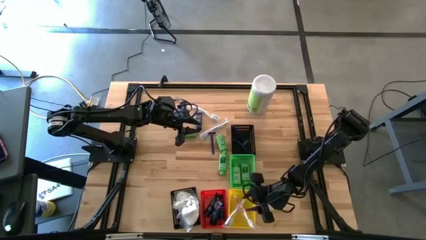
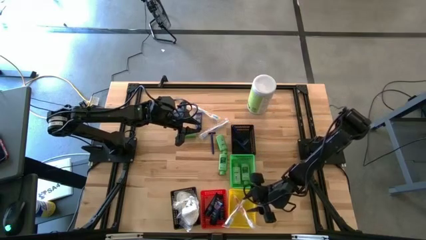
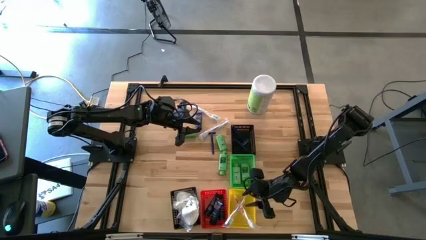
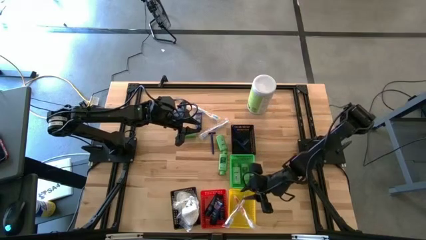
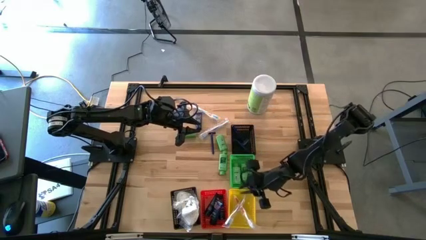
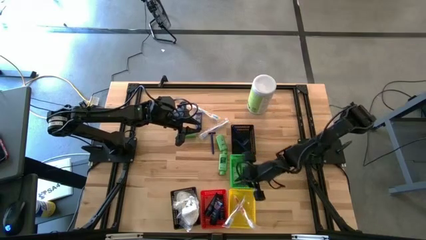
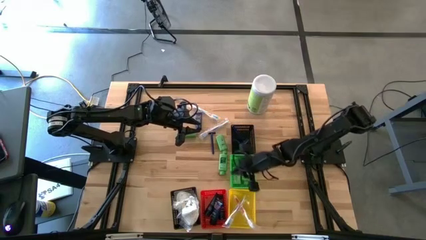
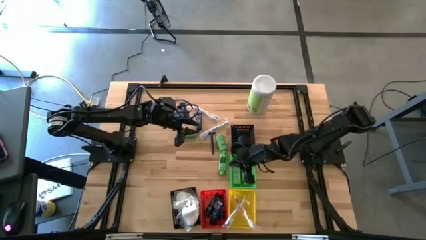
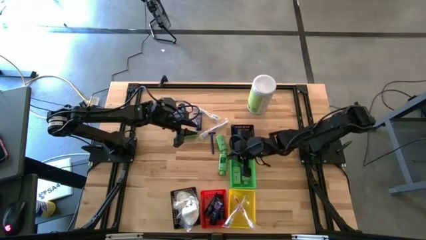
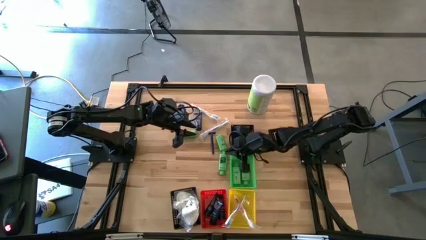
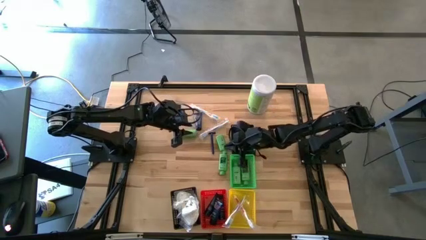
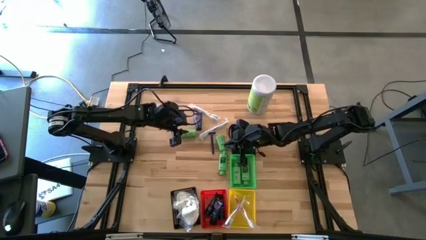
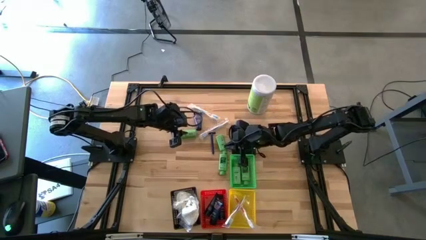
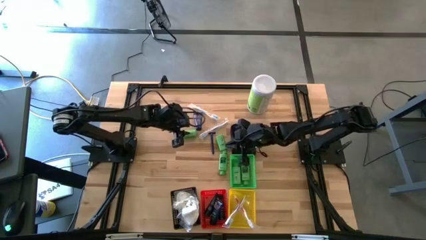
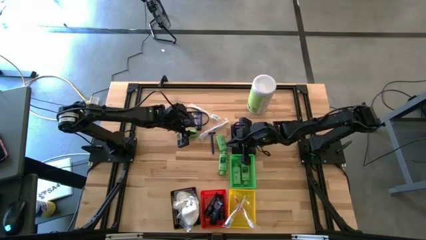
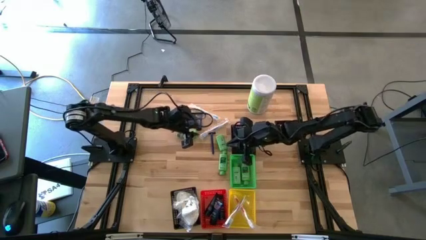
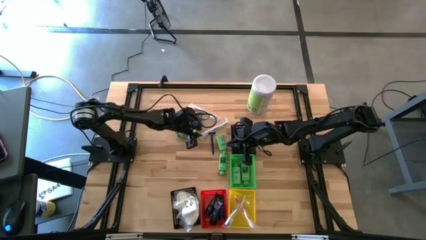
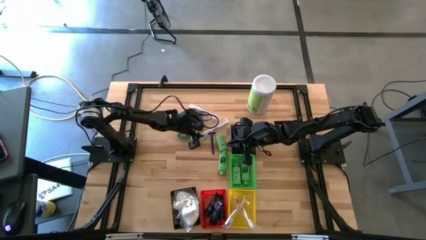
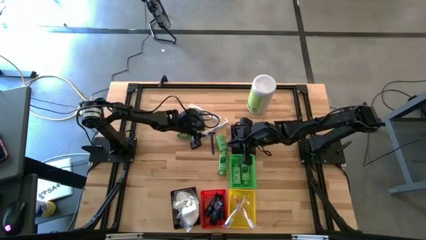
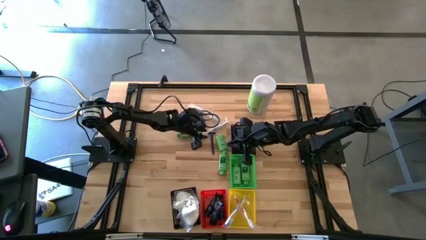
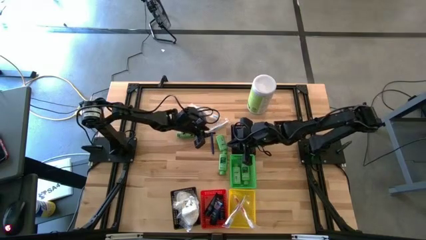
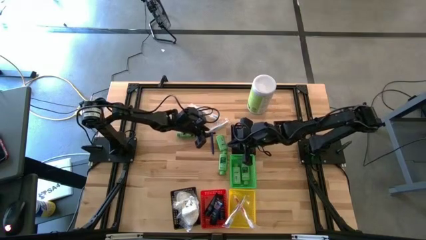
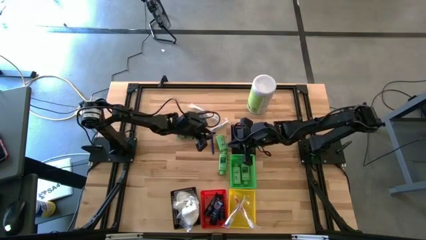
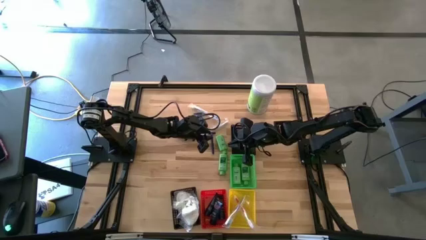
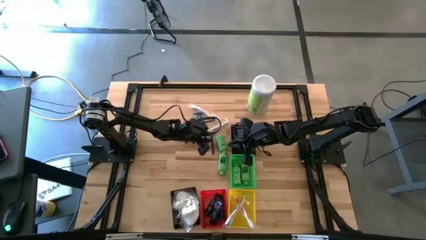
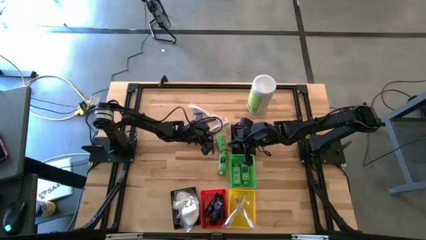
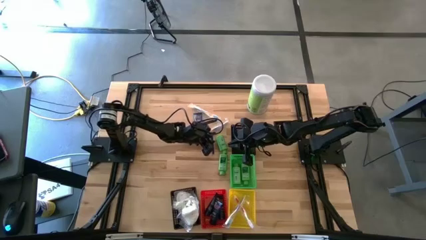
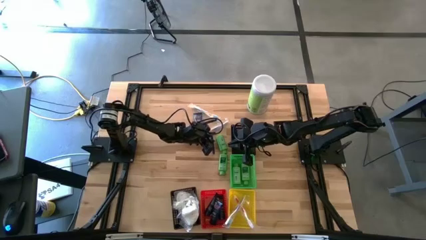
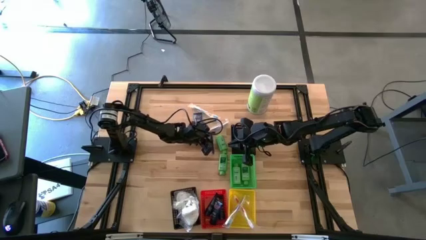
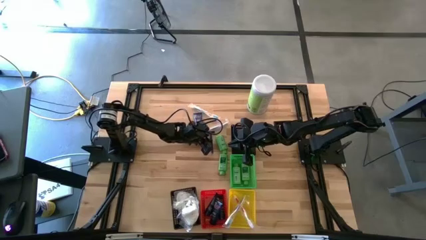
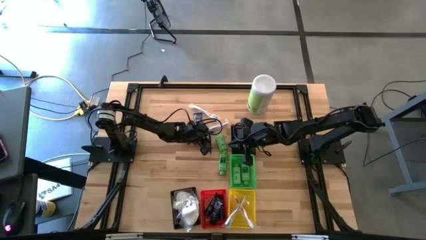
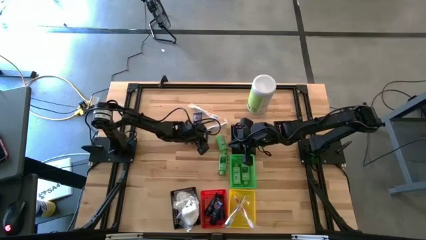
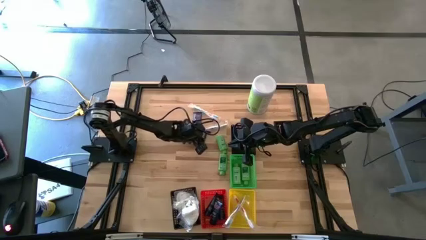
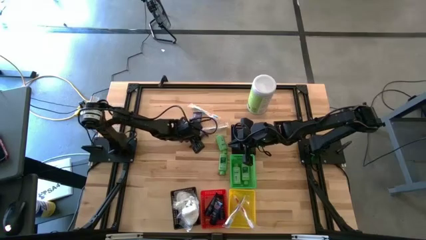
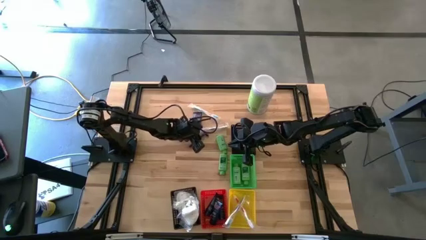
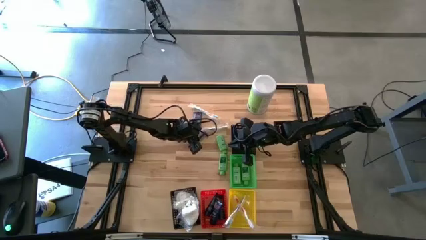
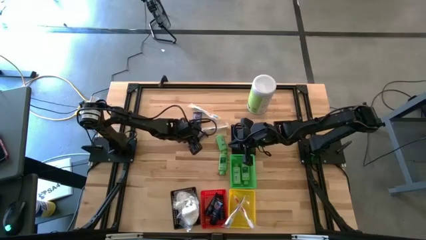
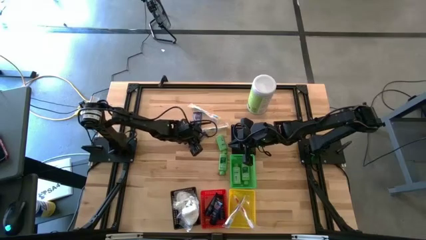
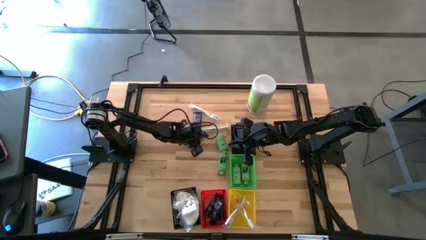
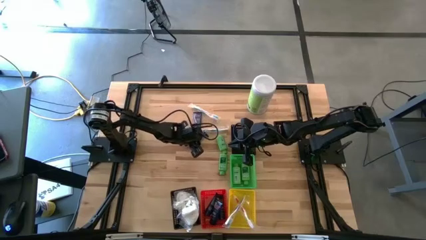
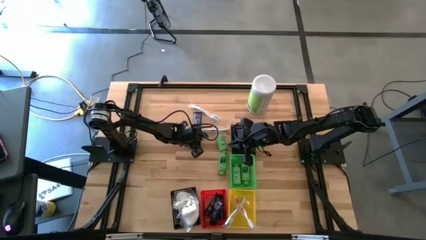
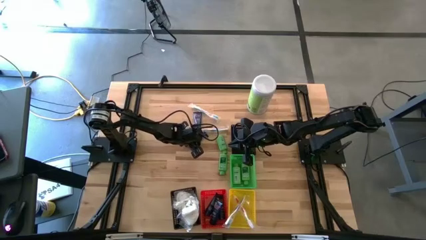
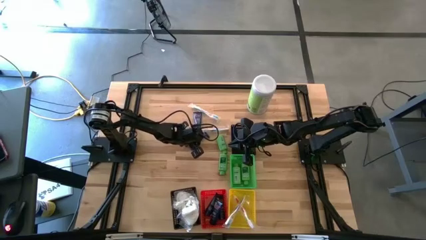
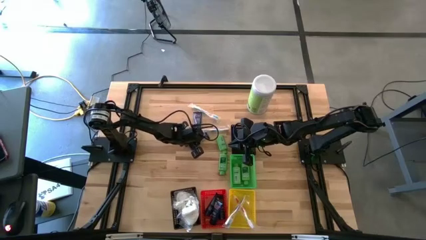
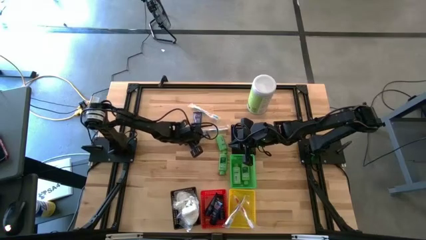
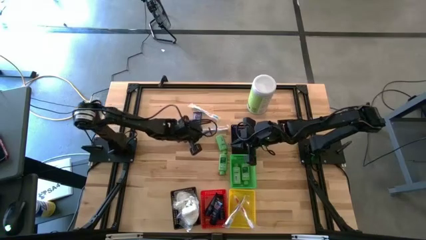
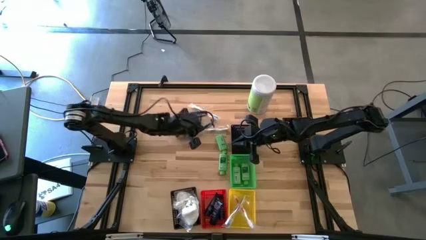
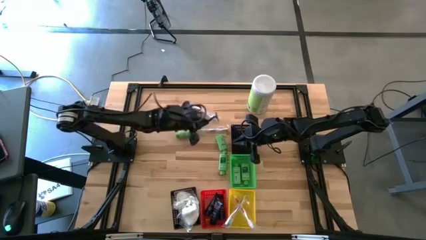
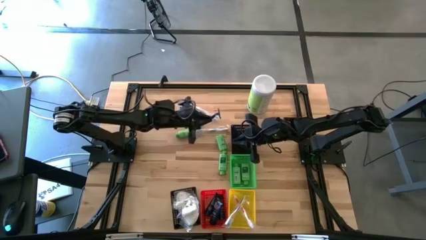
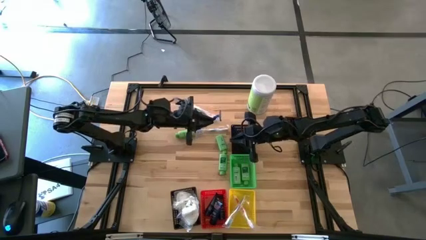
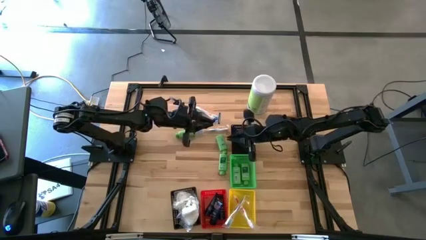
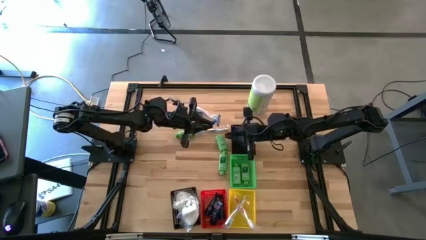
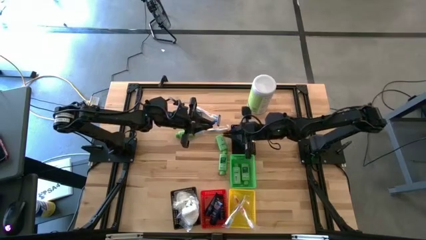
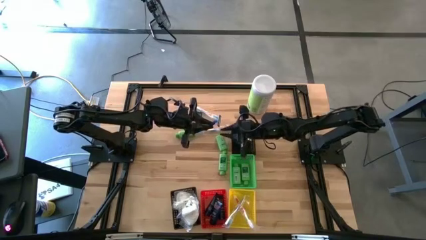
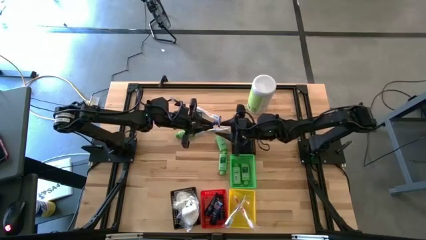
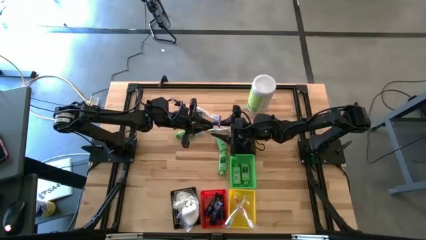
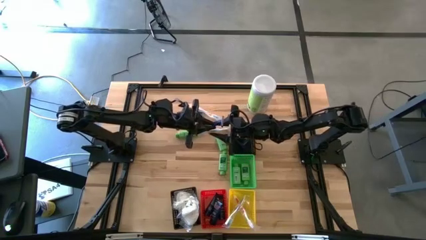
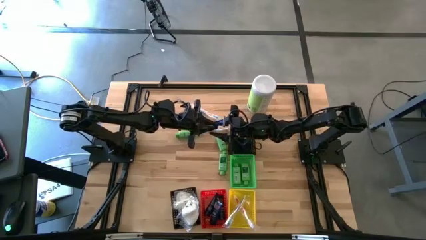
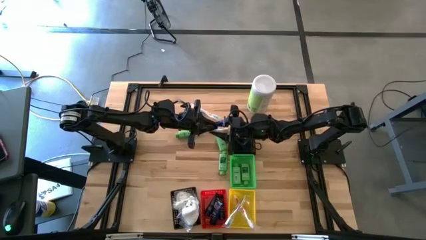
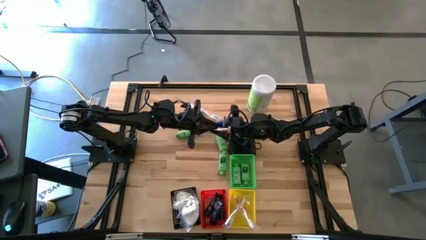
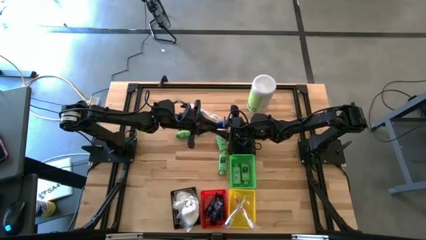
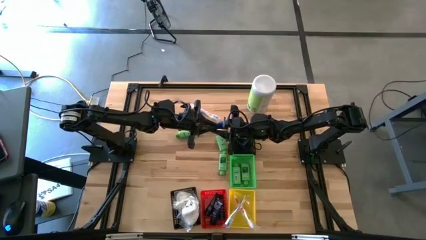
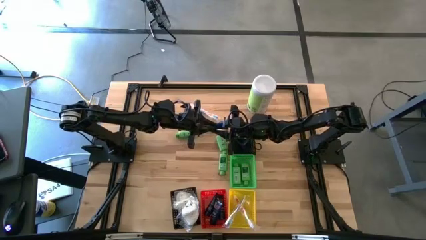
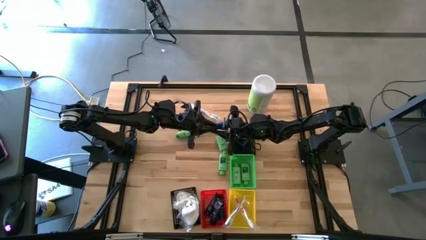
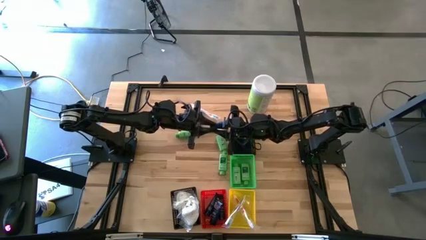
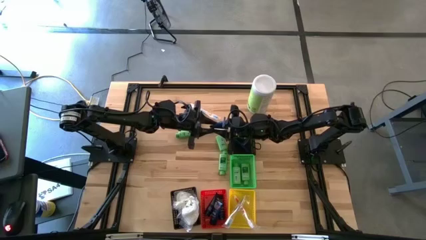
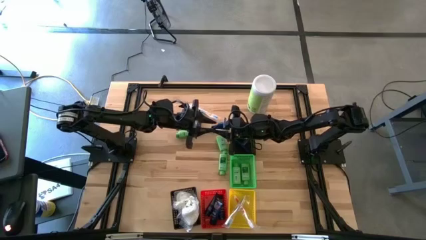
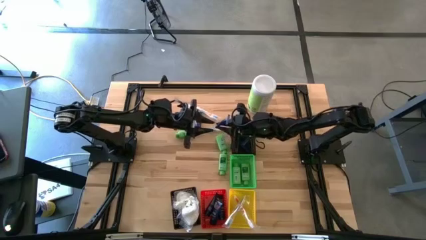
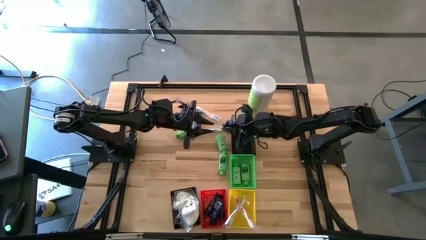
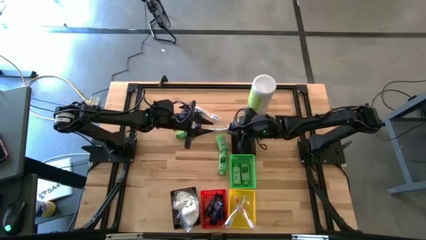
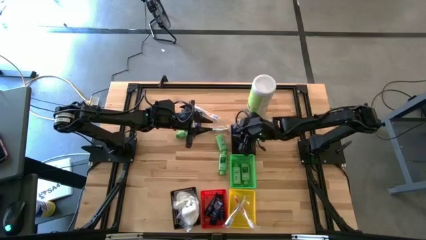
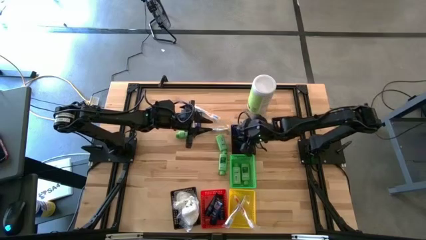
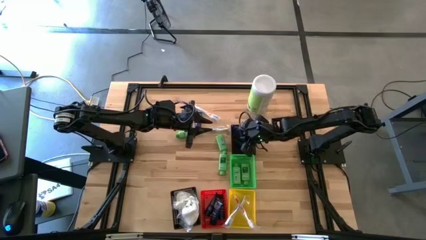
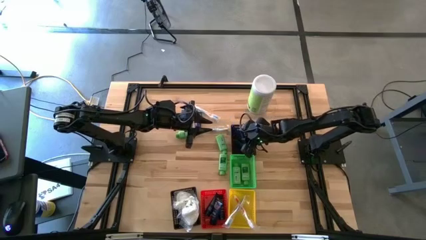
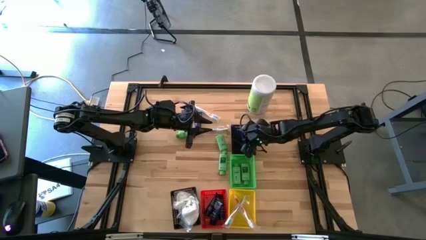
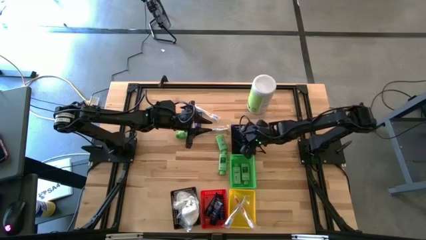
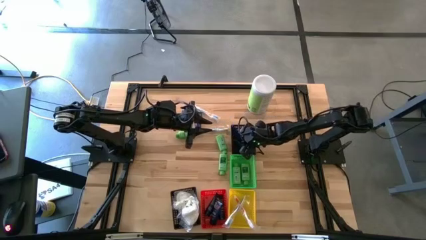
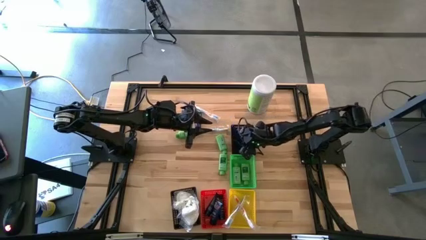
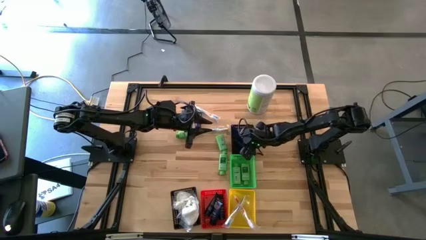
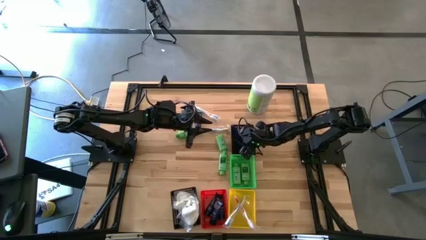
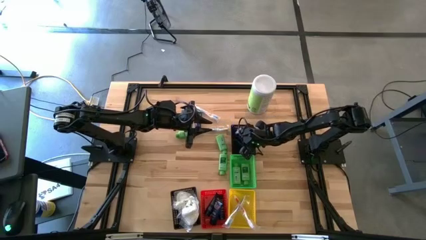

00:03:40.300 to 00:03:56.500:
Task: Pick & Place Travel size toiletries
Put the blue razor into the top black bin

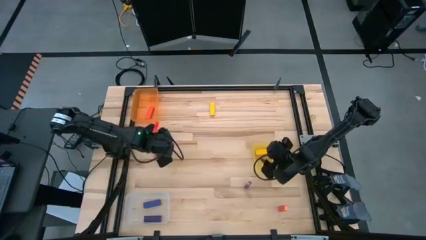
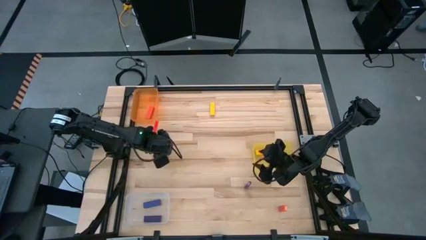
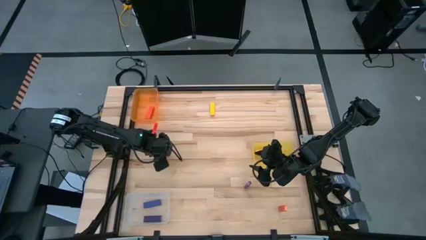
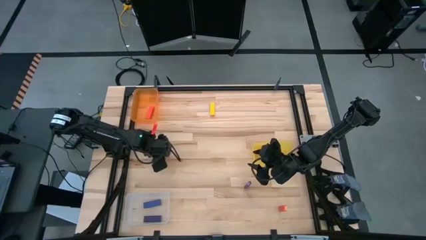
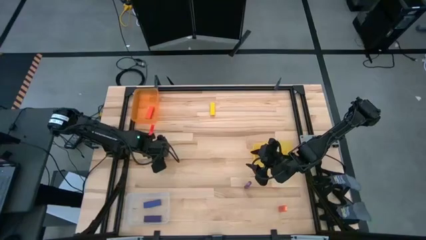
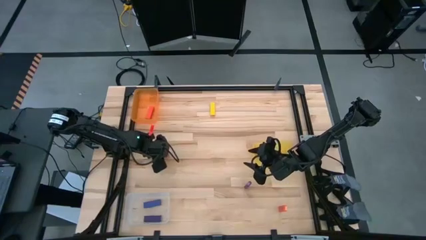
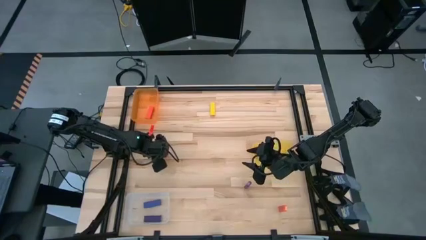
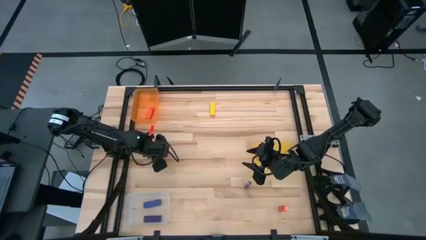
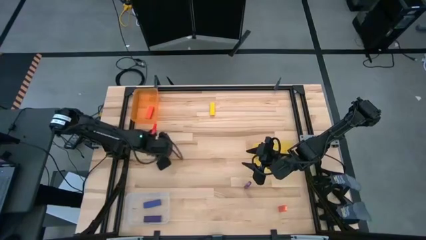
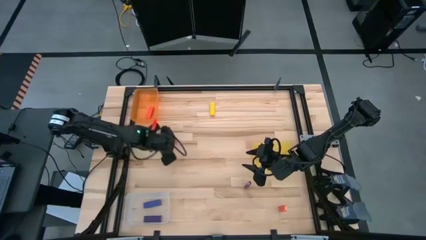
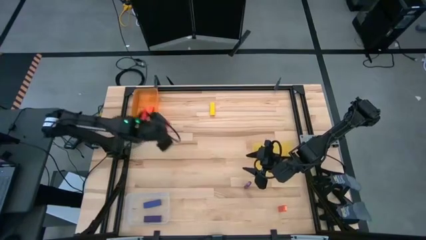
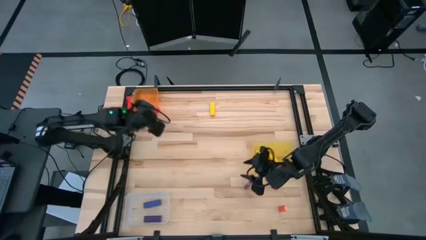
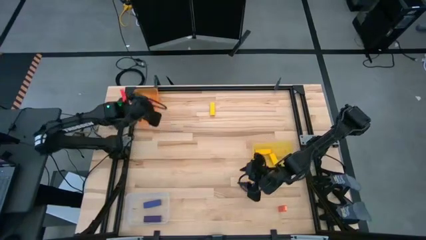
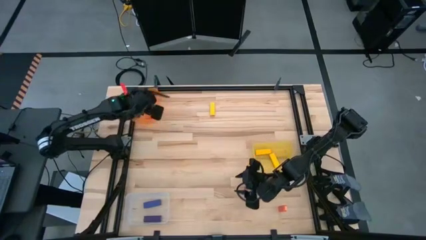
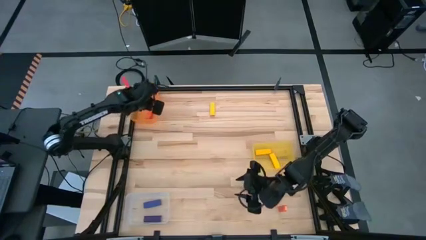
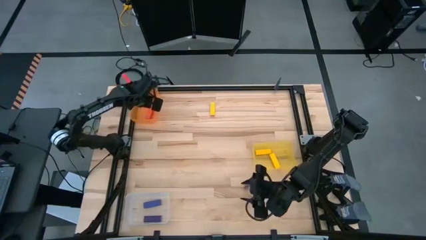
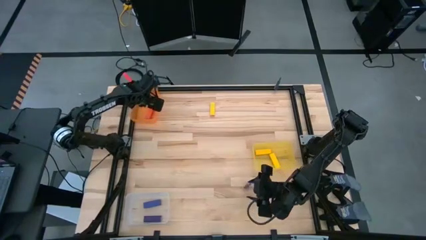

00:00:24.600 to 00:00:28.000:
Task: Sort blocks
Put the top left orange block into the orange transparent bin
